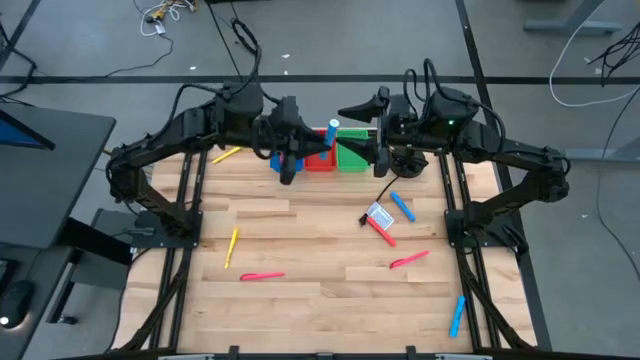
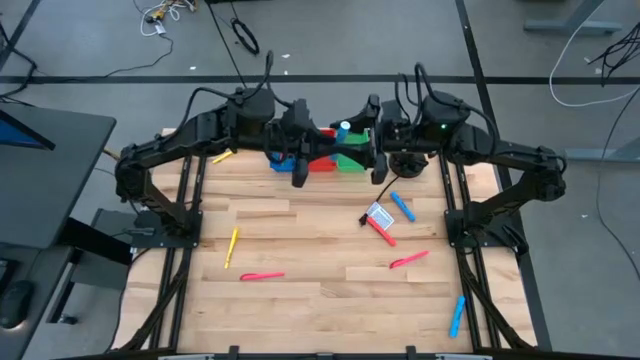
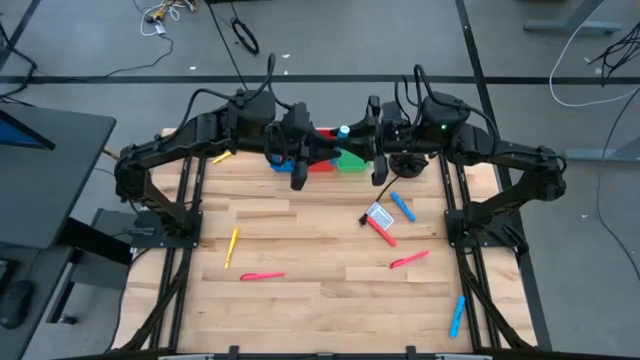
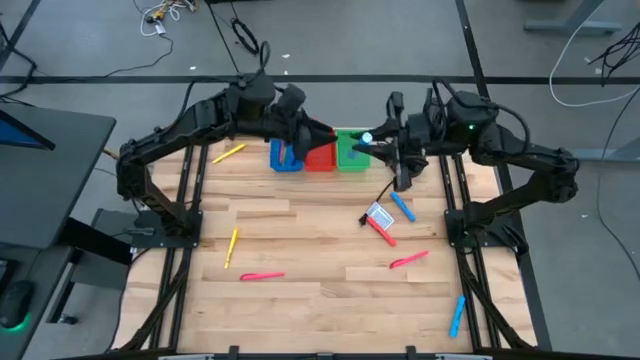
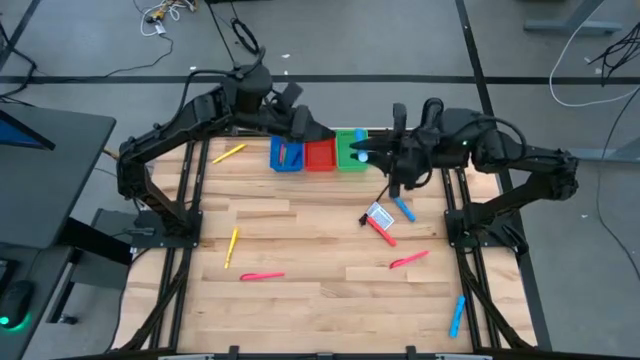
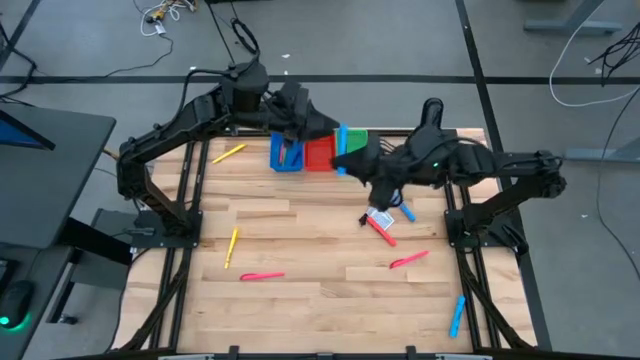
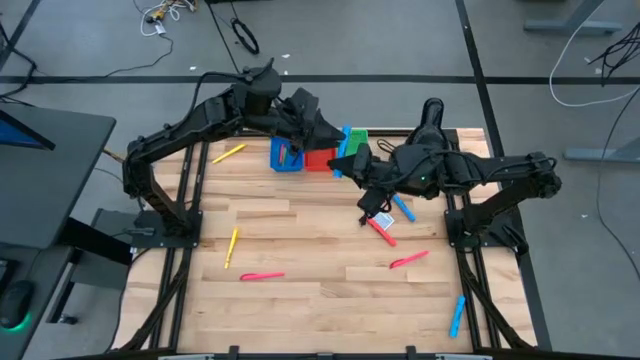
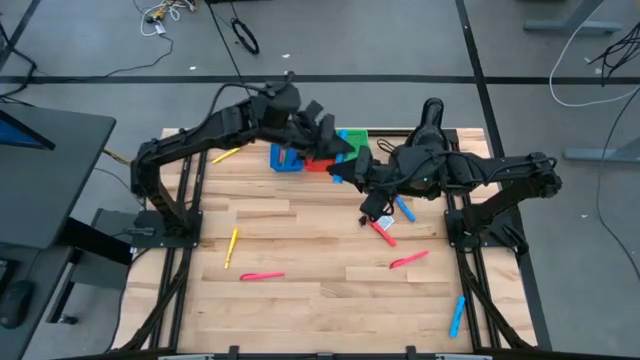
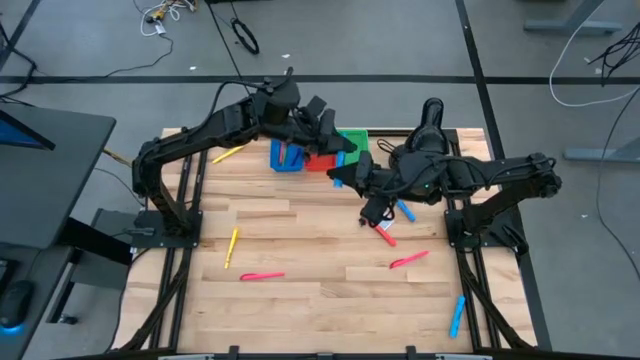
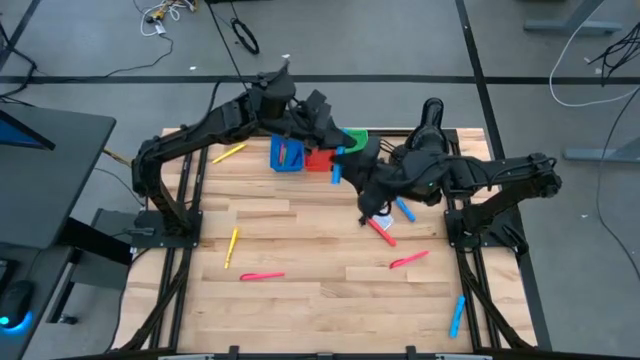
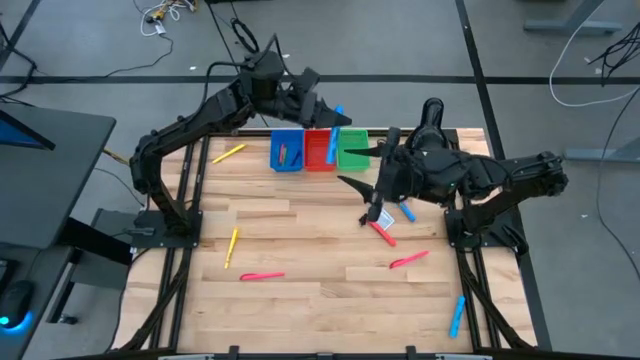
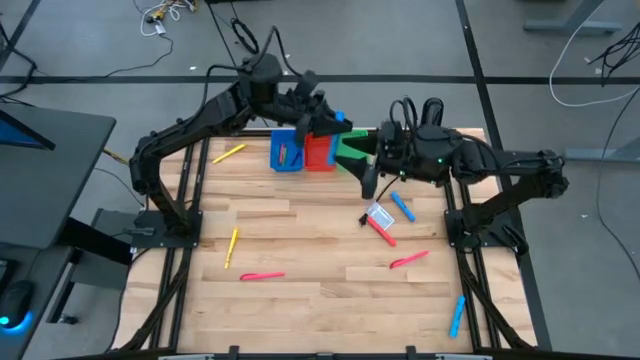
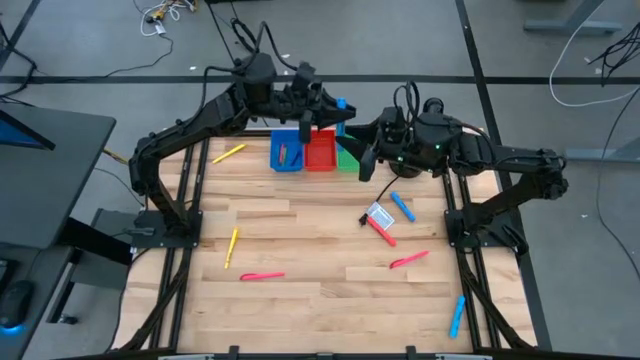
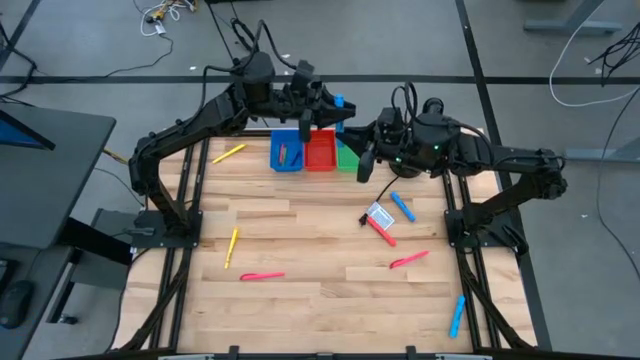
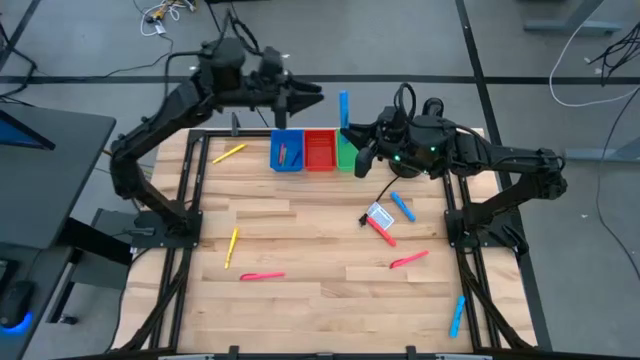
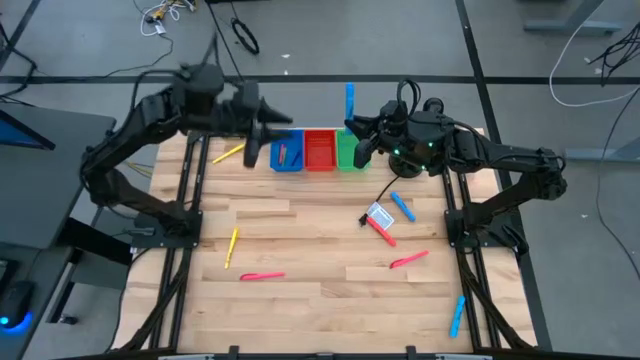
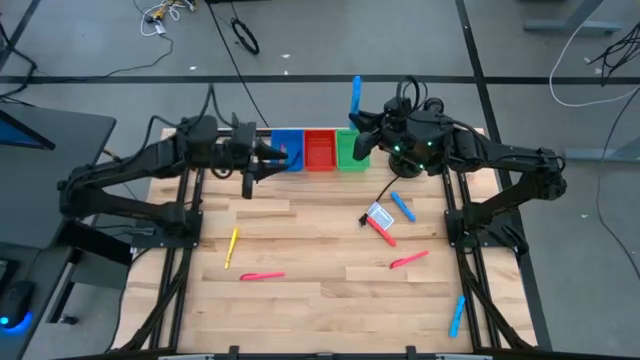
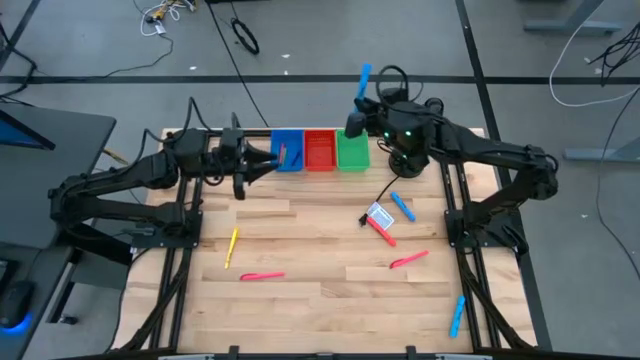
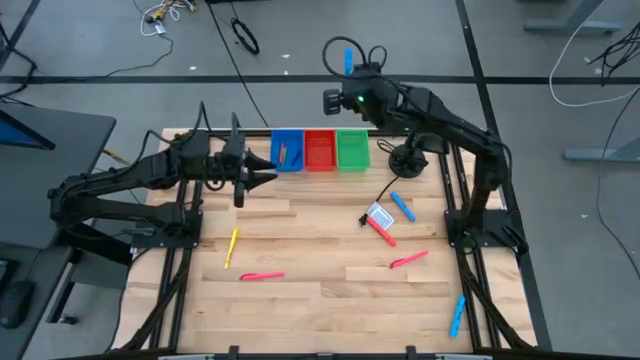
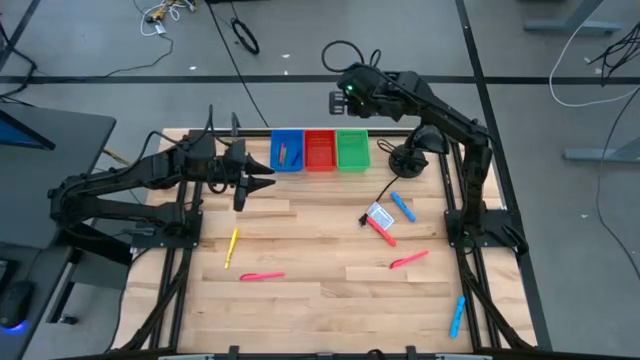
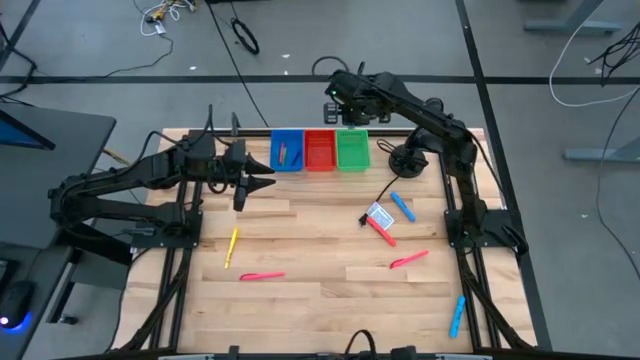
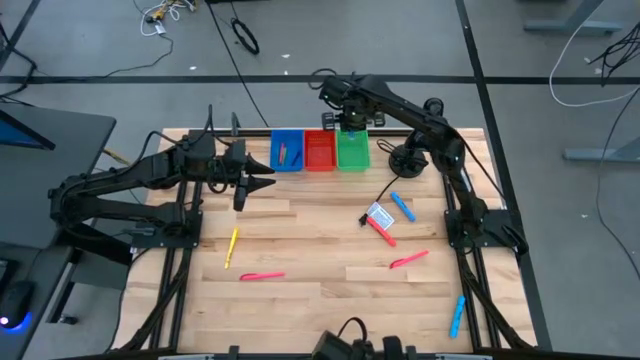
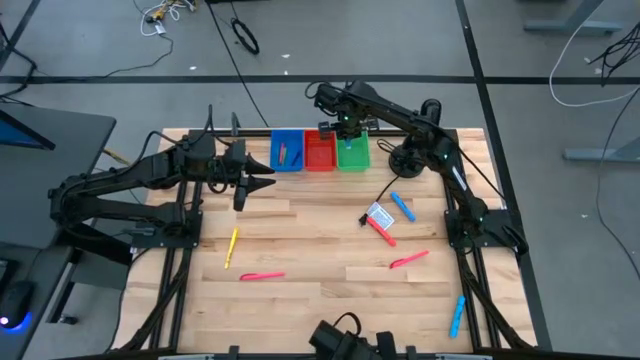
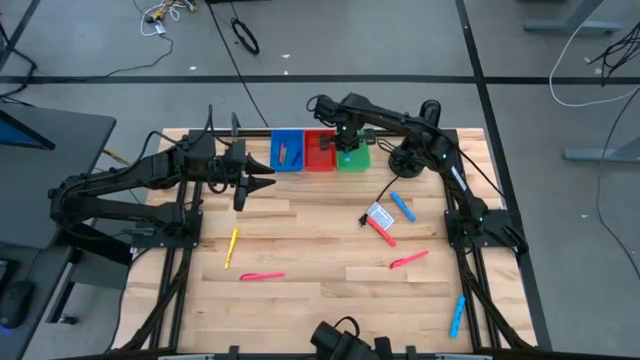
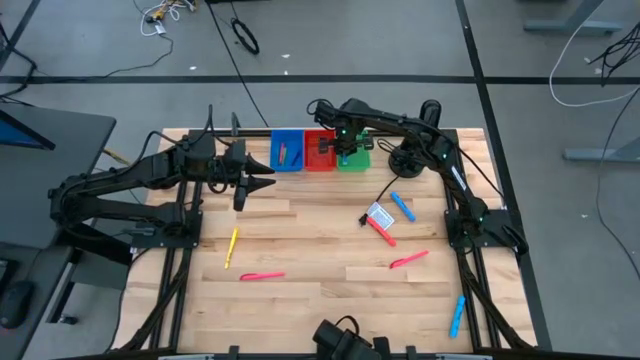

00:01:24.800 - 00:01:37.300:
Task: Pick & Place Markers
Put the top left blue highlighter into the green bin

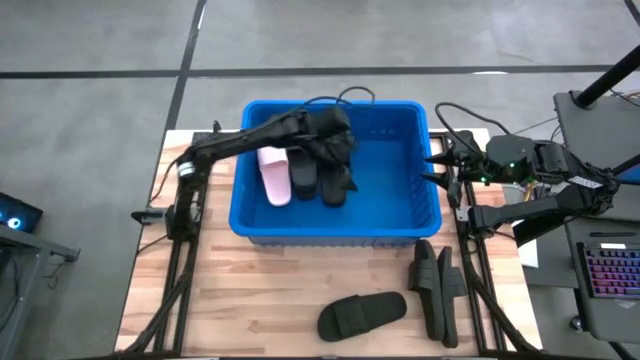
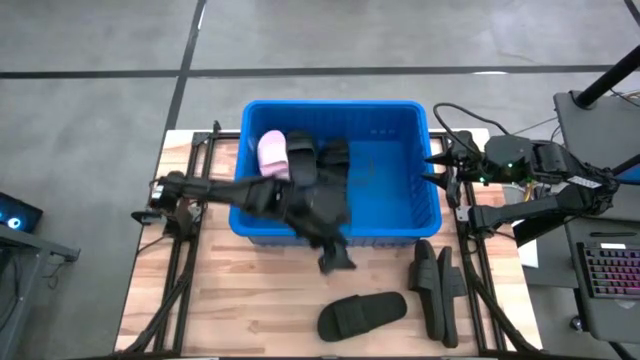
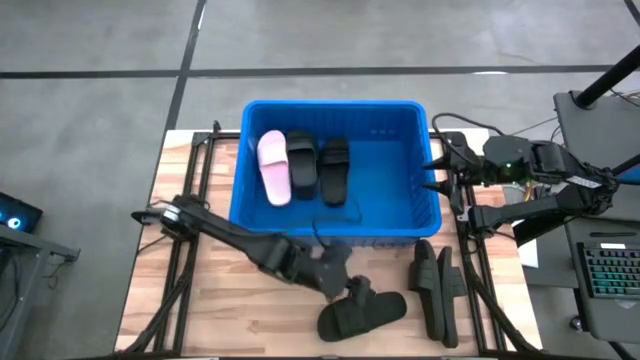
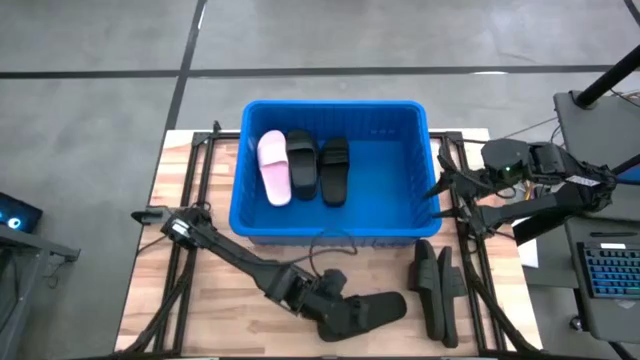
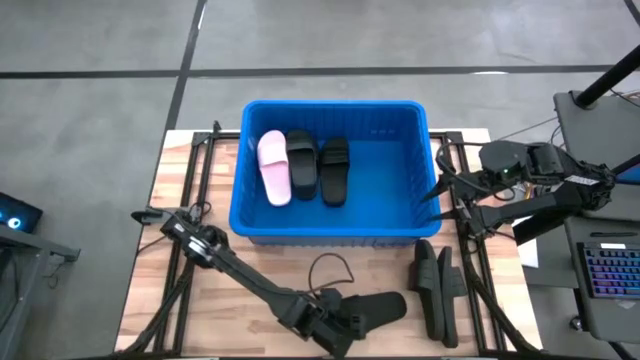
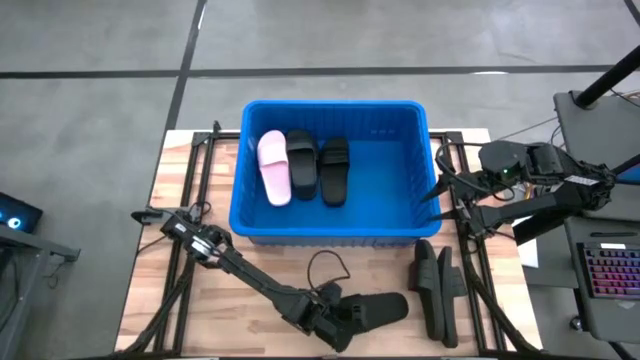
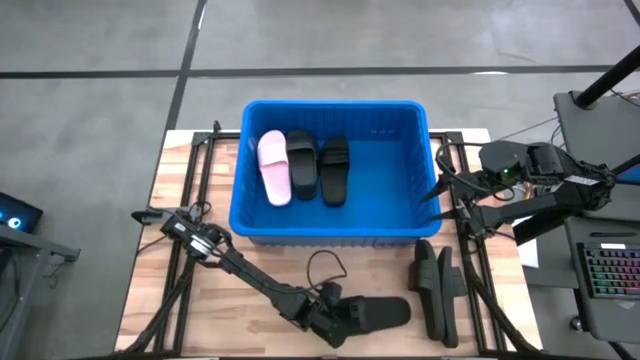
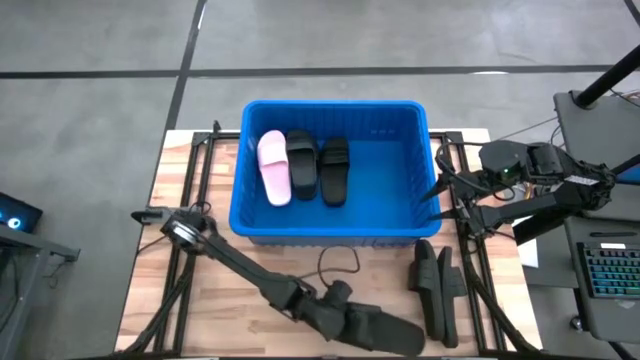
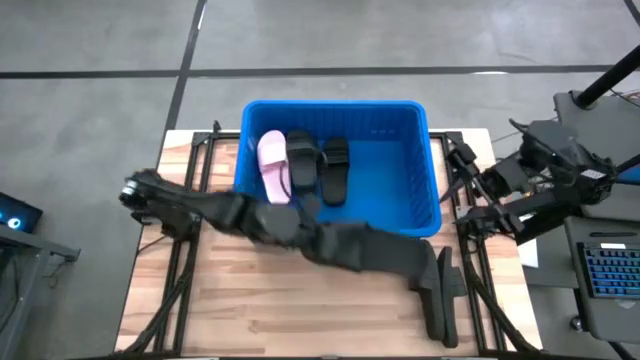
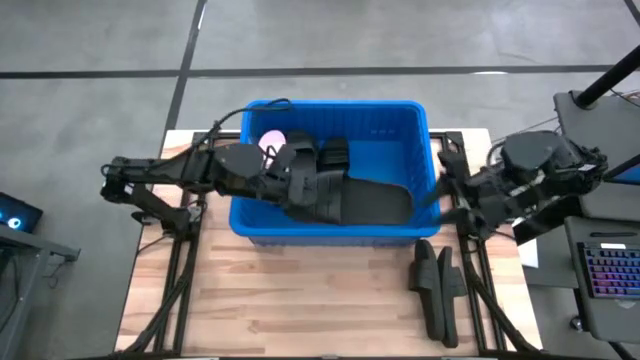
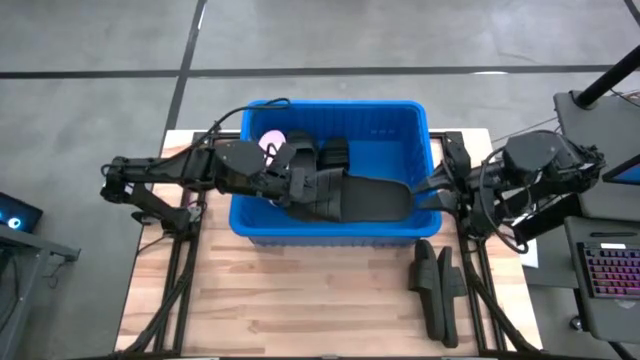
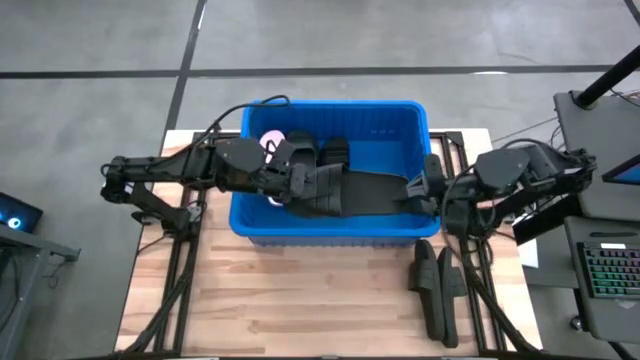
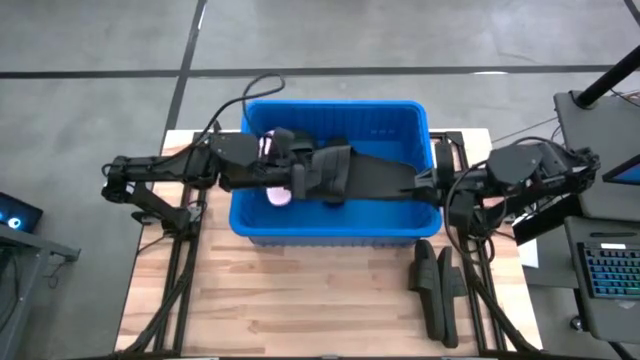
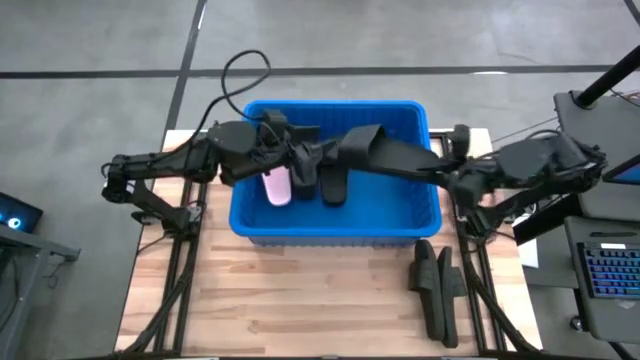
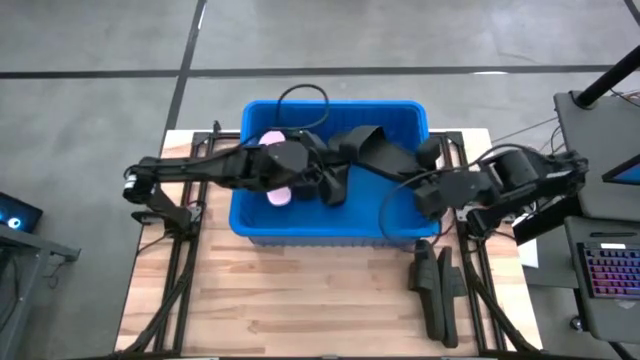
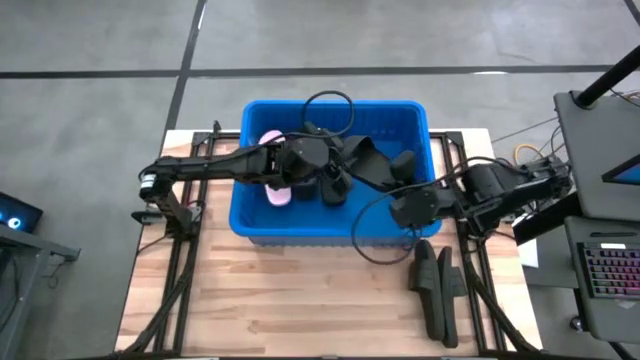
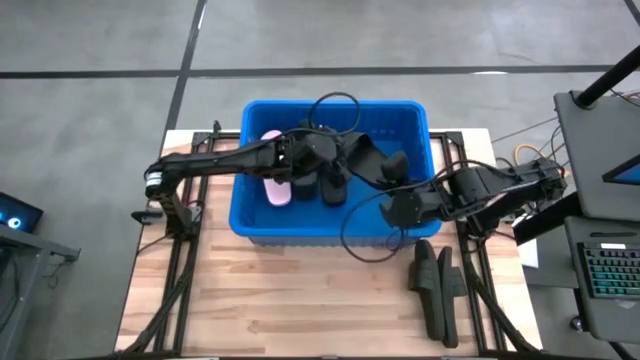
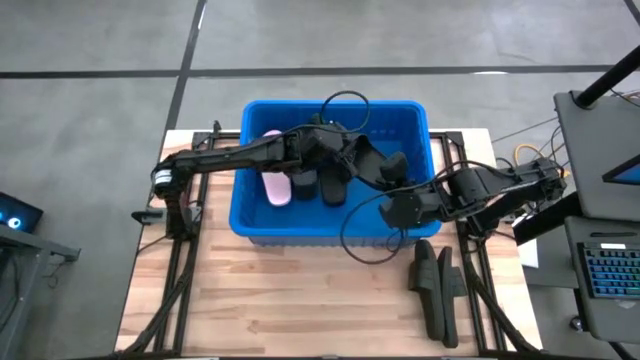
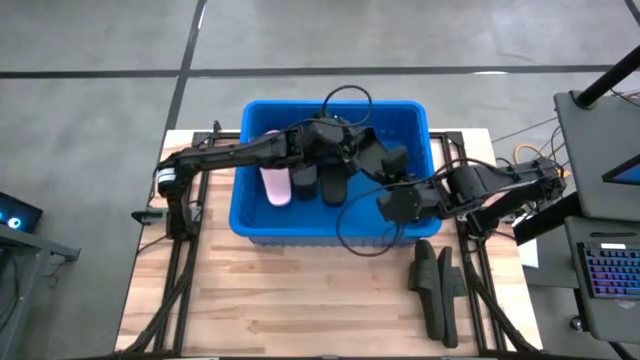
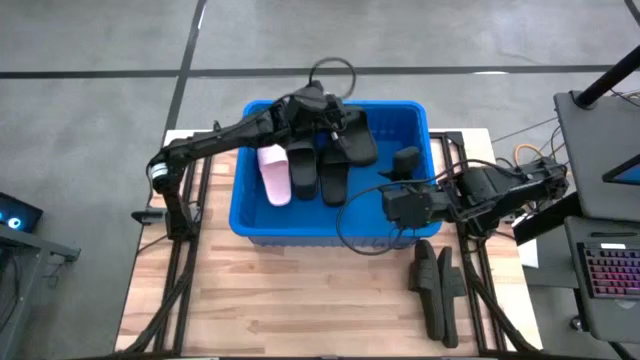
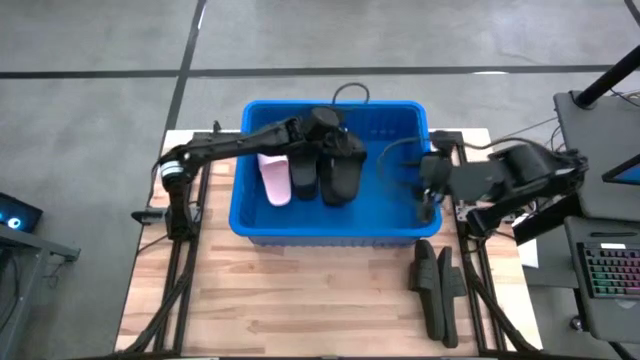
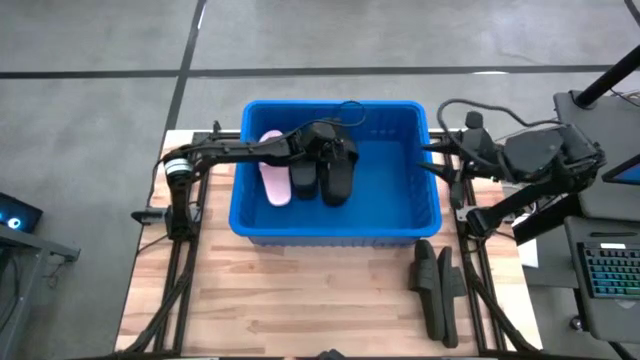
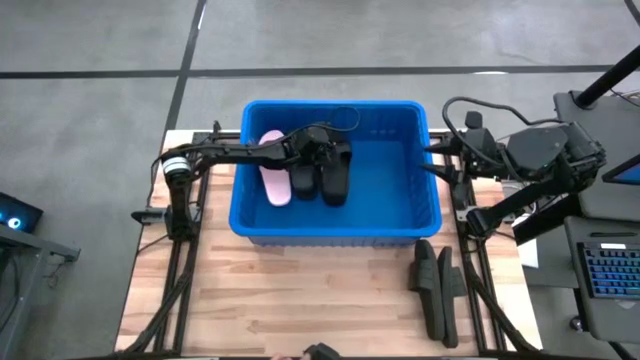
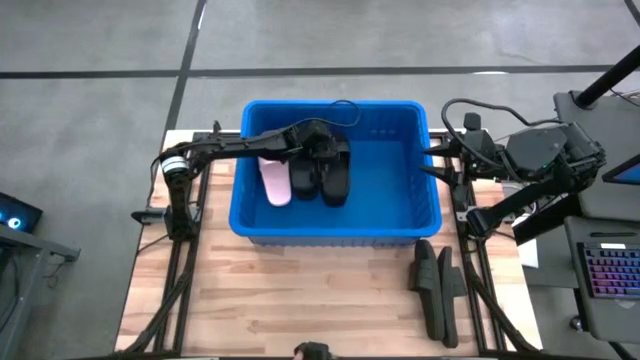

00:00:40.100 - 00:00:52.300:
Task: Pick and place slides into bin
Put the black slide into the bin
